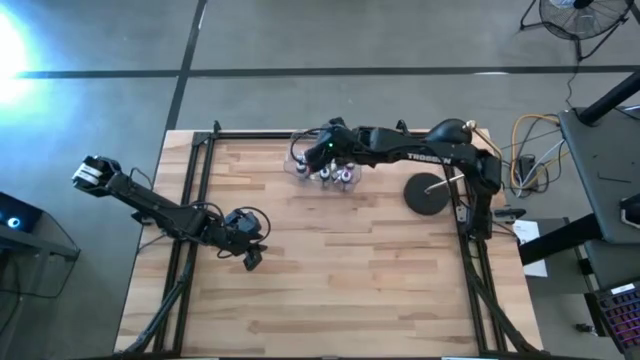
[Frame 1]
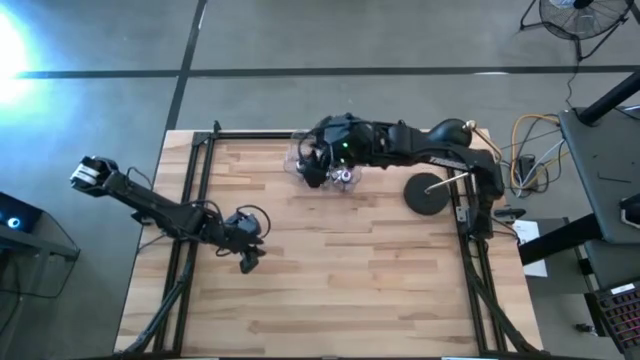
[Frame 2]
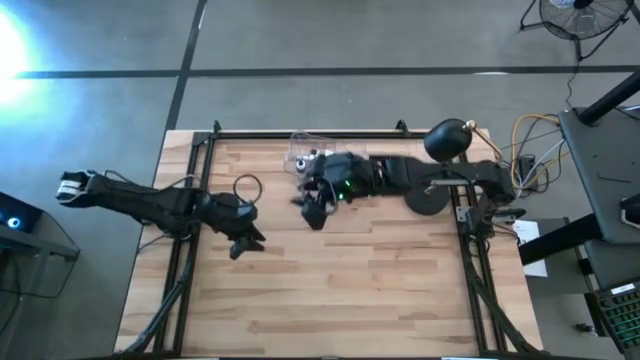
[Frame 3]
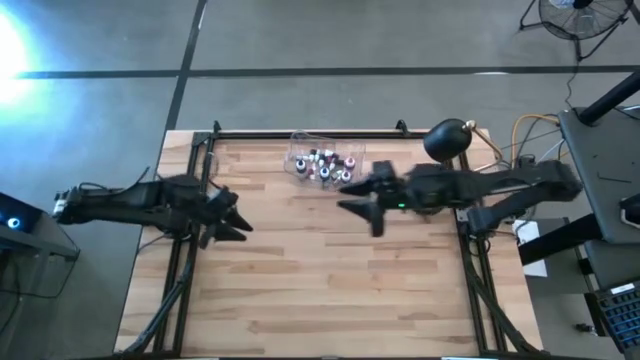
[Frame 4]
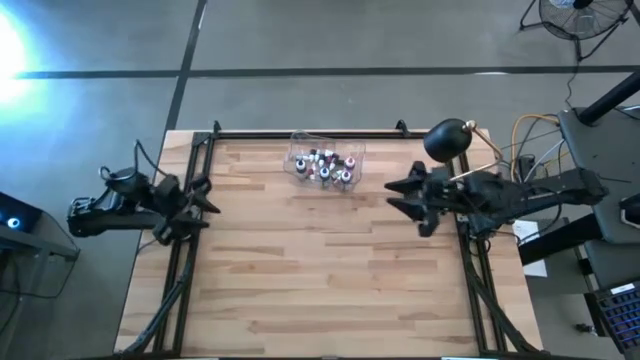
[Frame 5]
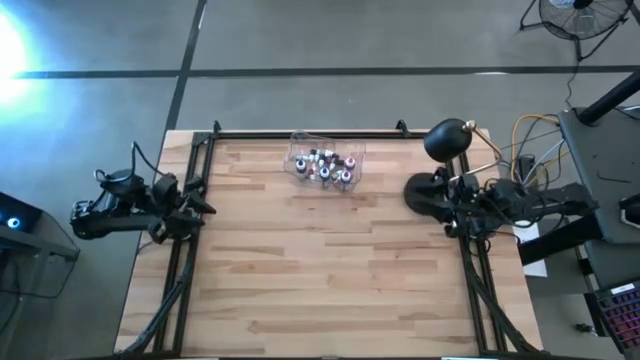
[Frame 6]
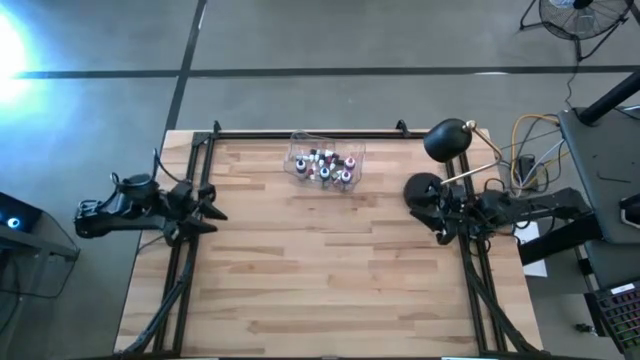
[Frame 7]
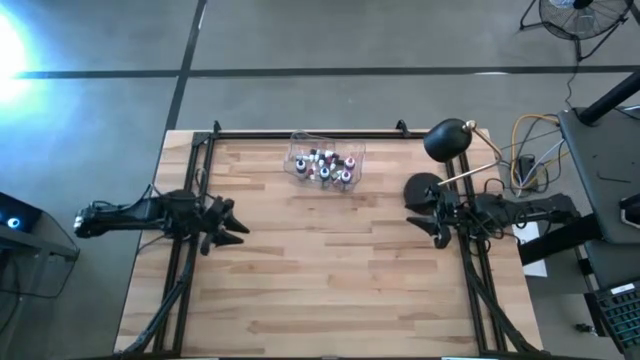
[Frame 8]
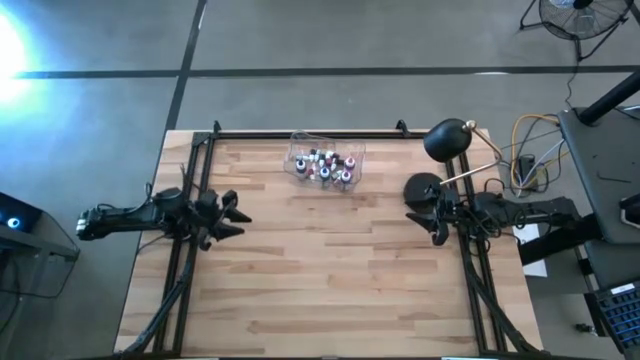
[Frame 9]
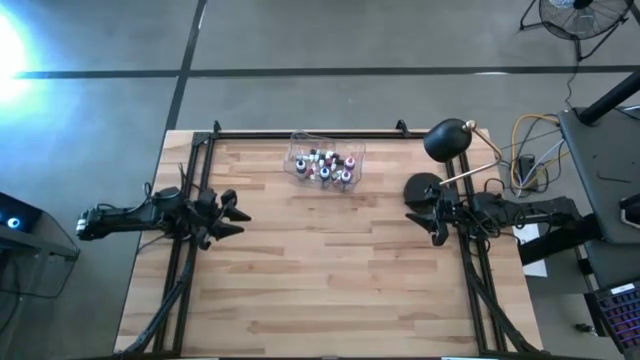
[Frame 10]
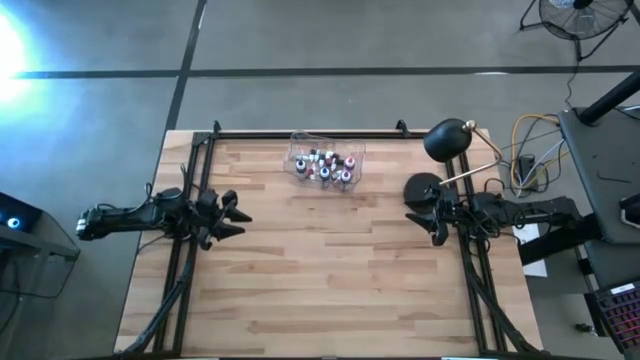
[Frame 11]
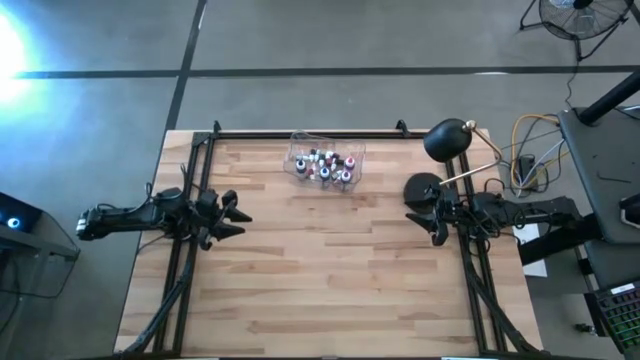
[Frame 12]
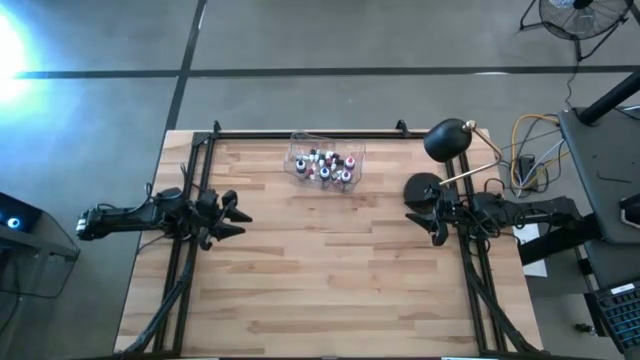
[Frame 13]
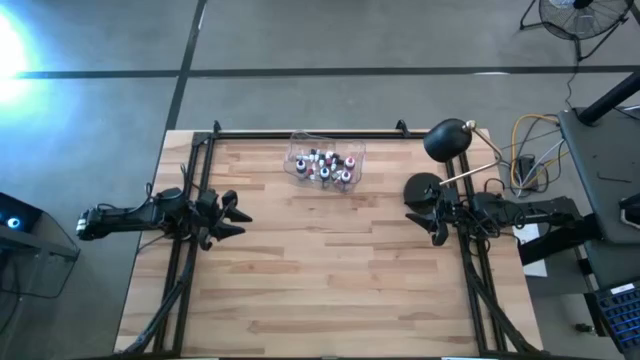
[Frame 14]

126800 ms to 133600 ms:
Task: Pick & Place food coloring
Return to Home Position

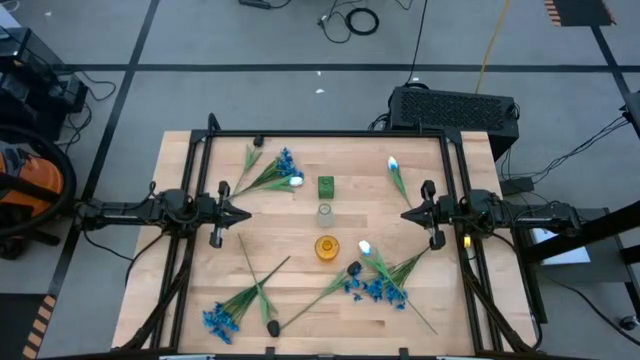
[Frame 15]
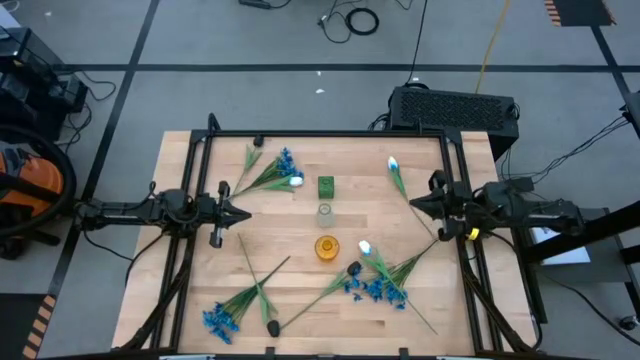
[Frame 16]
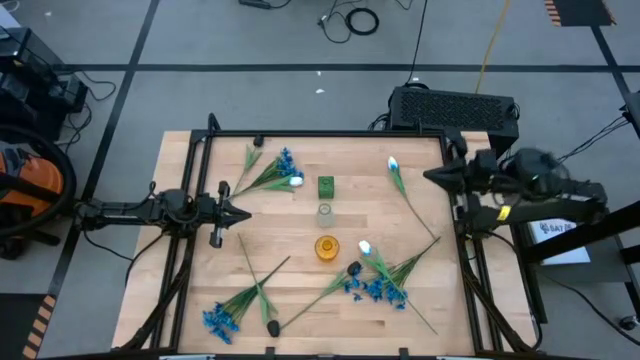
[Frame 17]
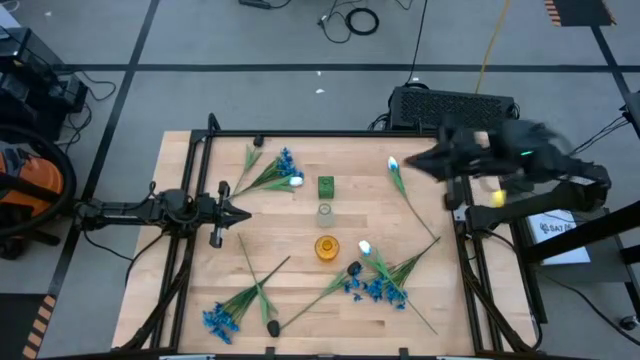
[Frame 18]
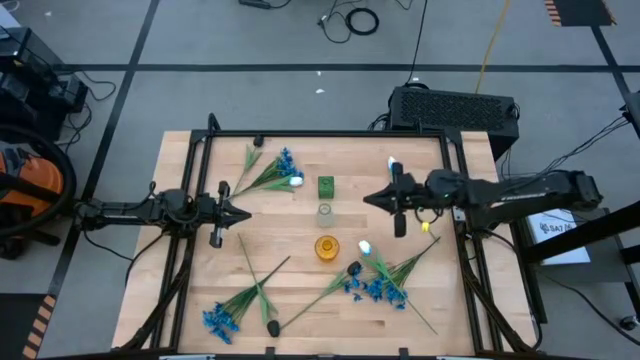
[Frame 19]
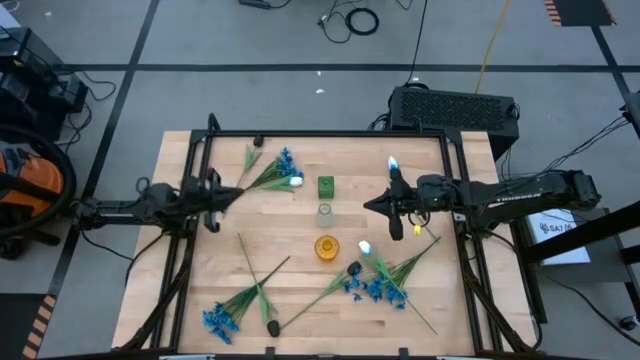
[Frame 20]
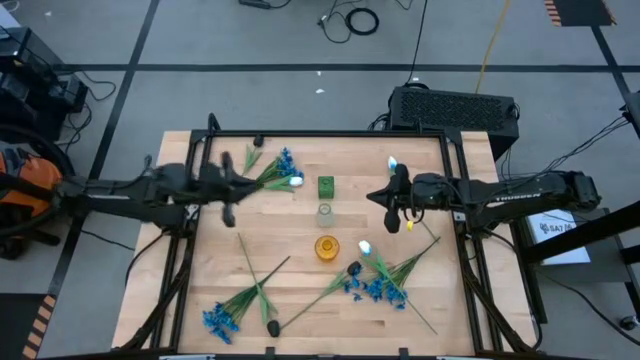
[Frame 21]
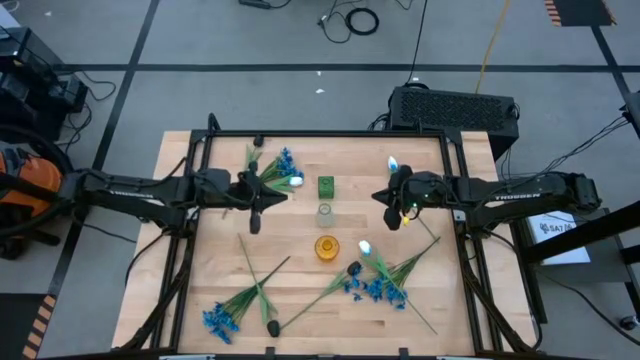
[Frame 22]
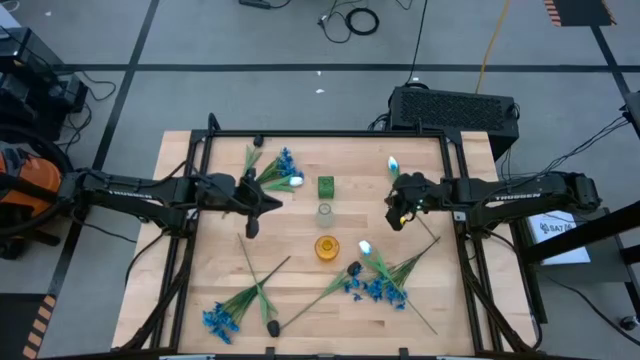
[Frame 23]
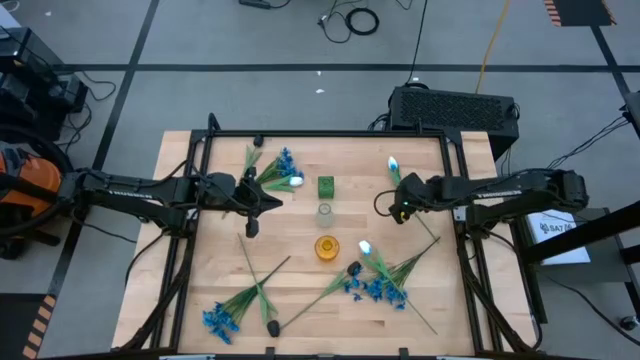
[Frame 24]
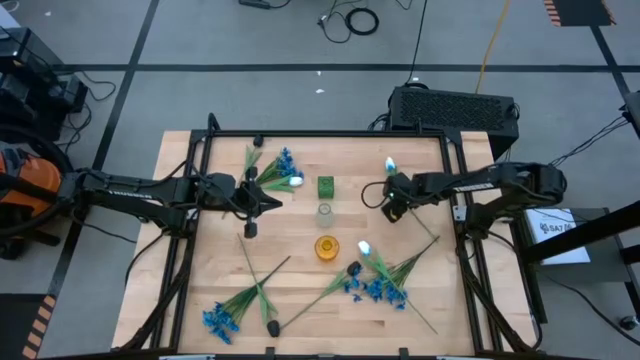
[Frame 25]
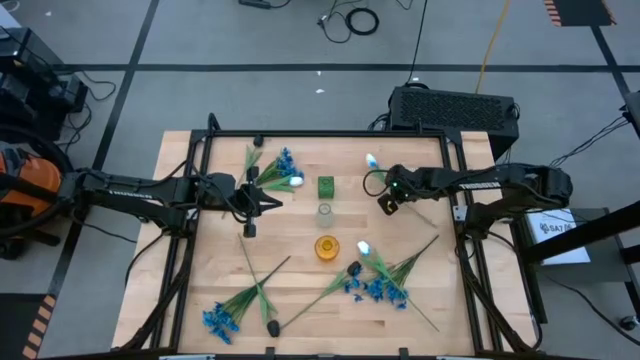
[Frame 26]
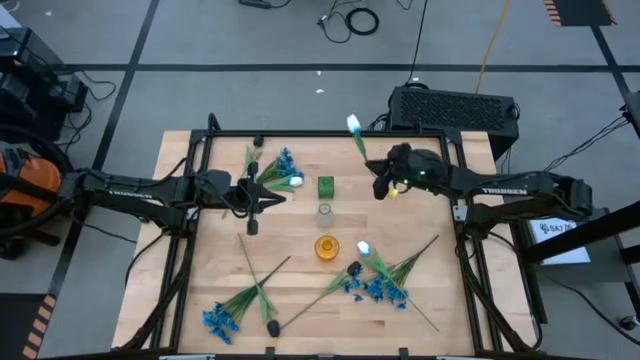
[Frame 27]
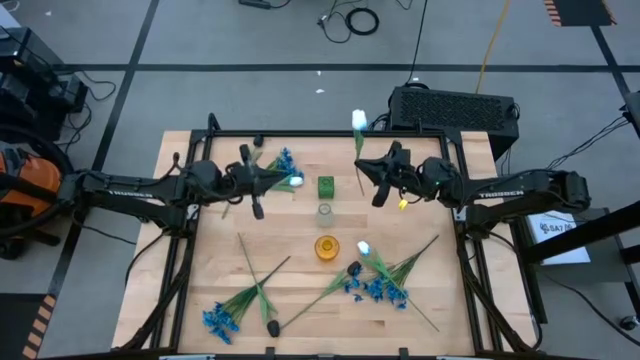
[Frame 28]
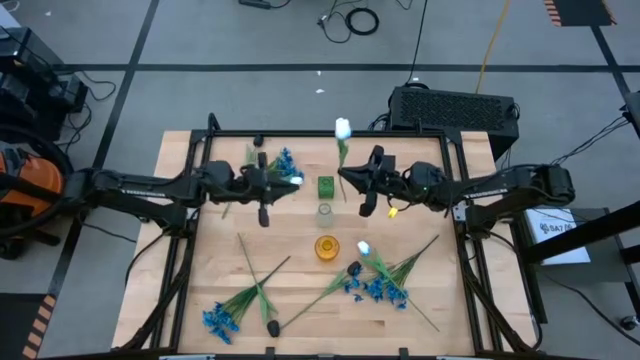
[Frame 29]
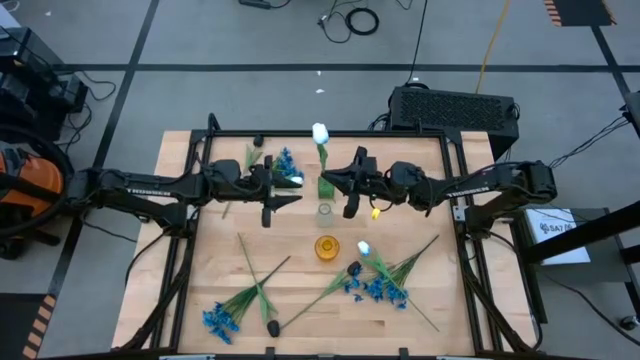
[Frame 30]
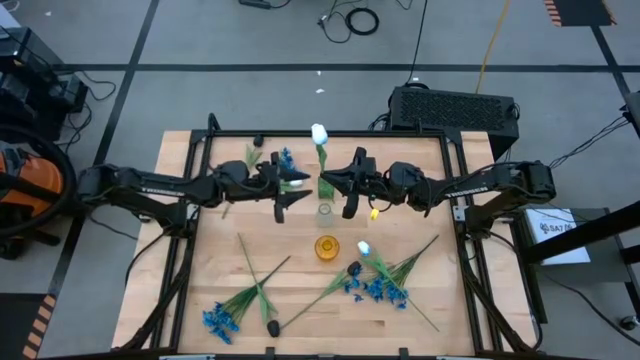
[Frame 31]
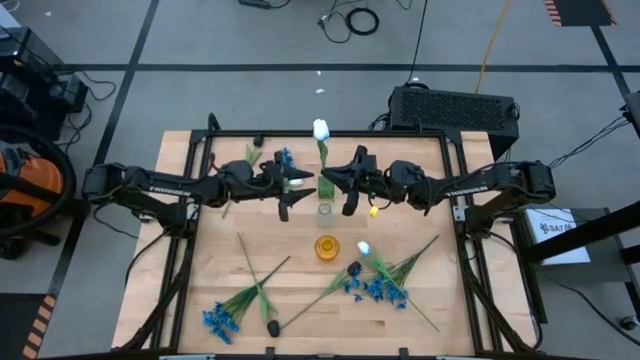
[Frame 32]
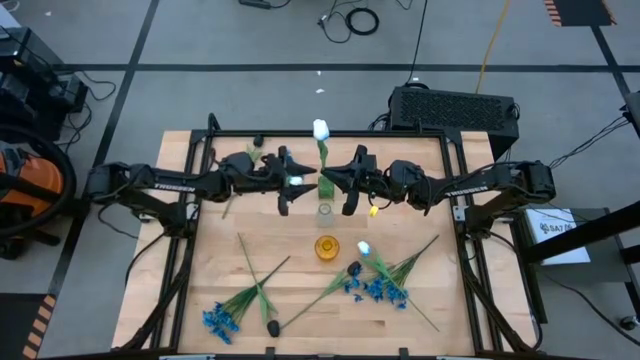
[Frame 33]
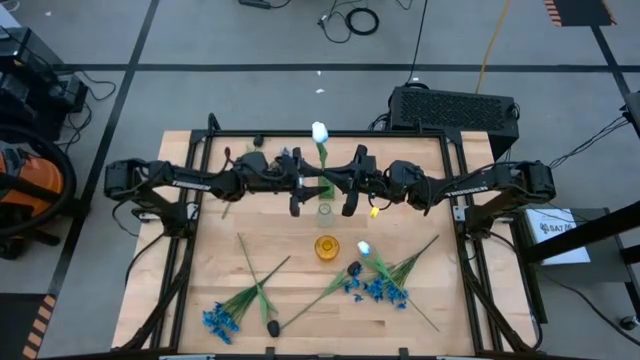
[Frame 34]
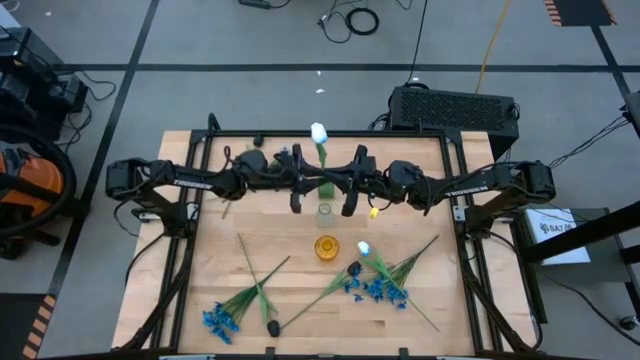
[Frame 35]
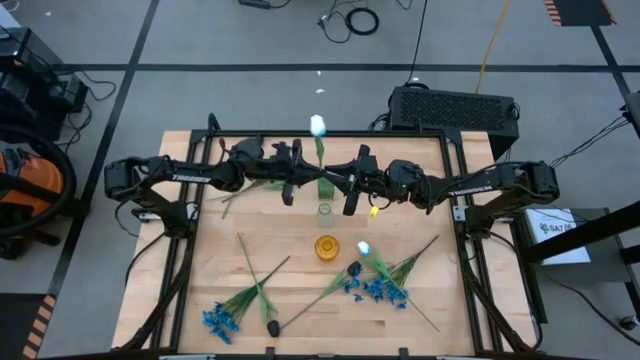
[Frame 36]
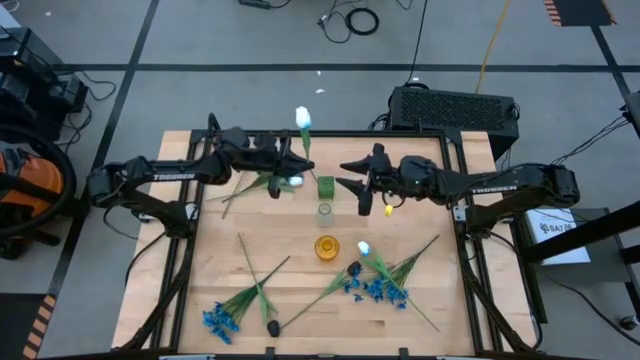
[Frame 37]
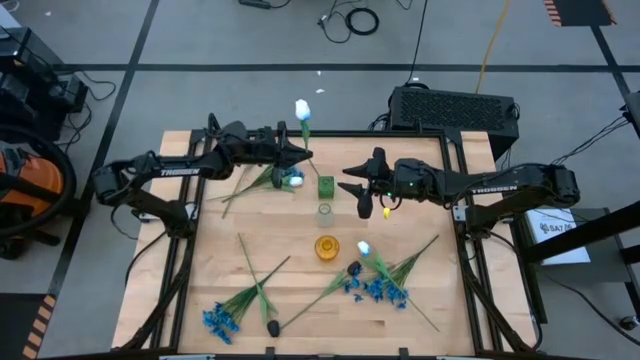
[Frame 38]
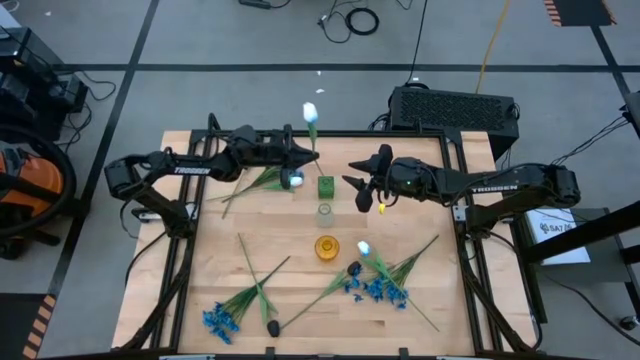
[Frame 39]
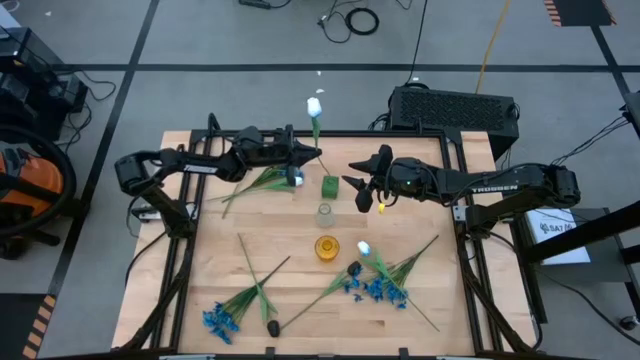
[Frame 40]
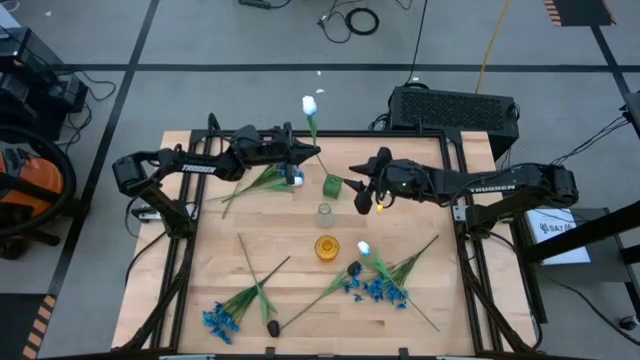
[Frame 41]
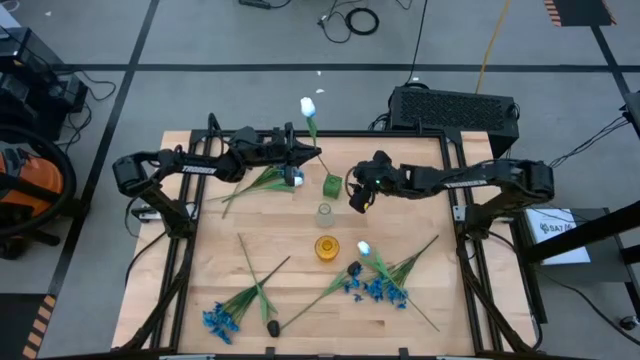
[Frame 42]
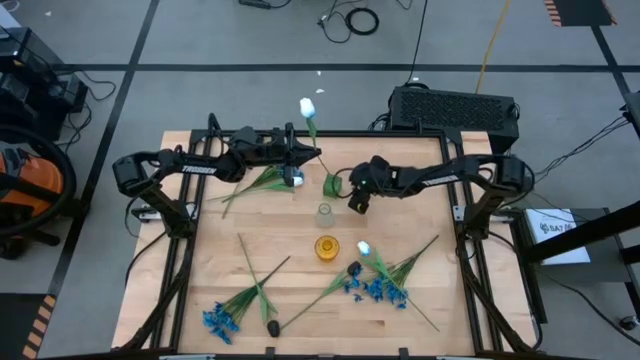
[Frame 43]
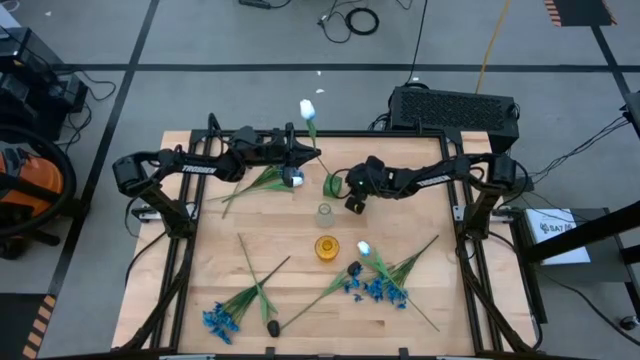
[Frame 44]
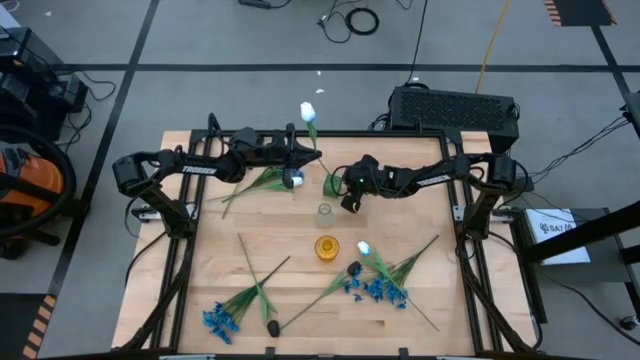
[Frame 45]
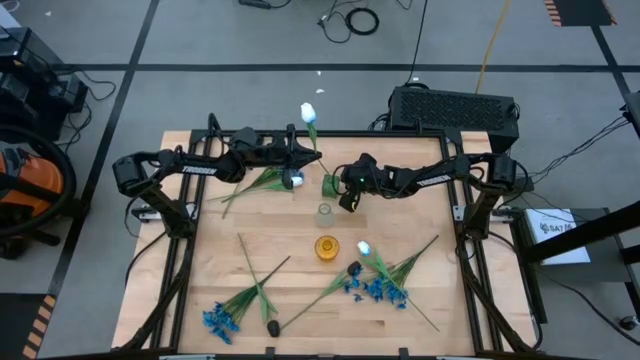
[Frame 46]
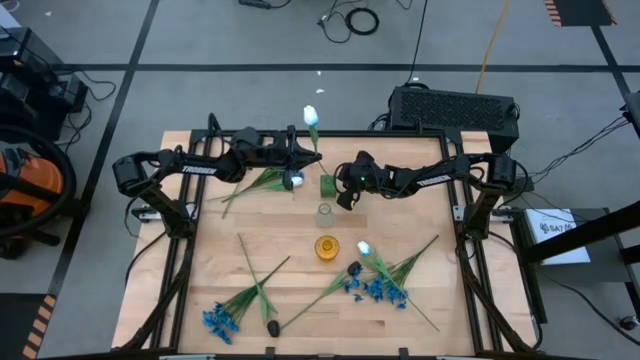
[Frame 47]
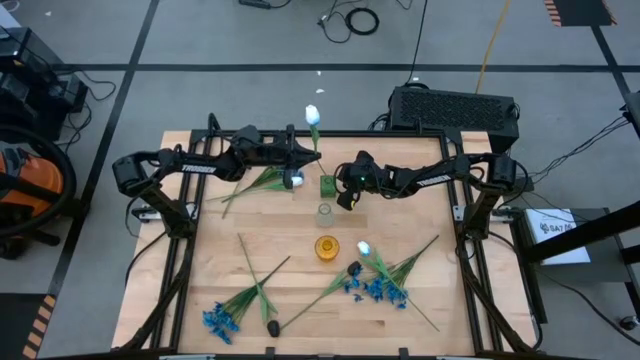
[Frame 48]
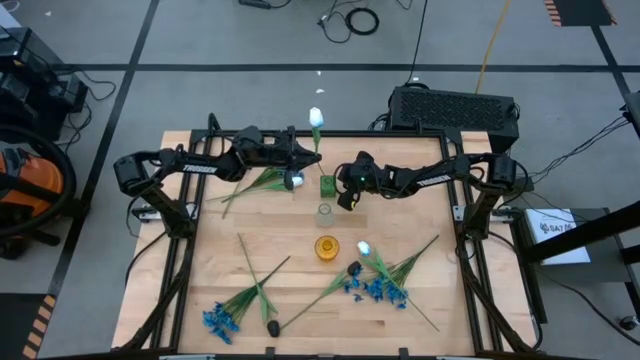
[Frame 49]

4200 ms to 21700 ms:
Task: Sort flowers into vase by color
Put the top right white flower into the green vase
